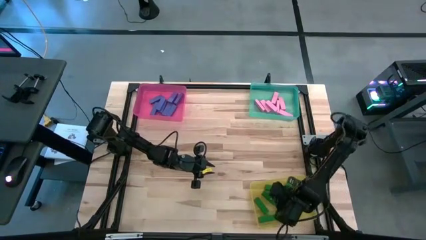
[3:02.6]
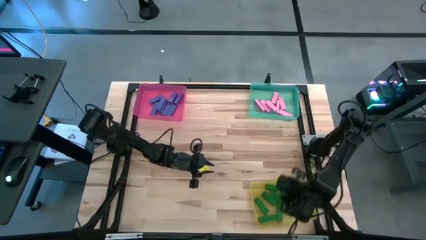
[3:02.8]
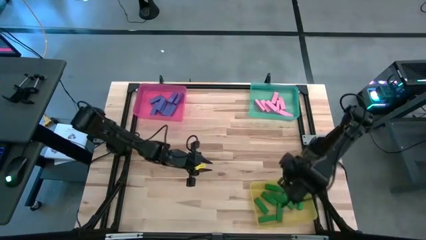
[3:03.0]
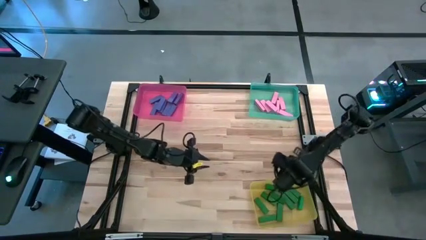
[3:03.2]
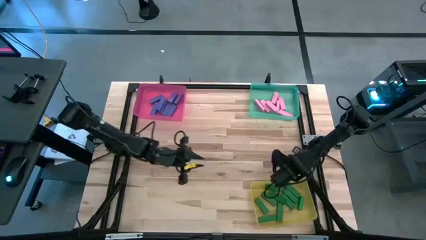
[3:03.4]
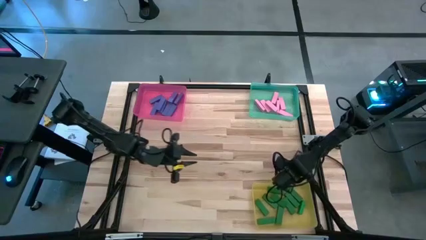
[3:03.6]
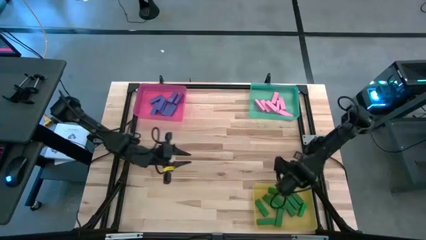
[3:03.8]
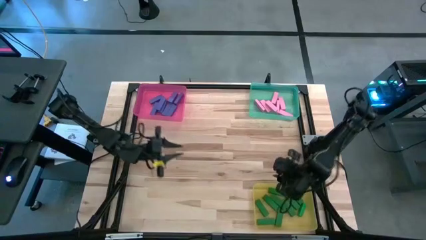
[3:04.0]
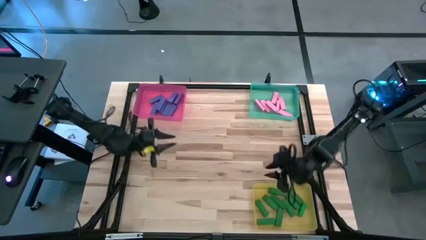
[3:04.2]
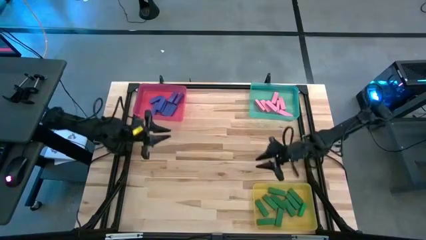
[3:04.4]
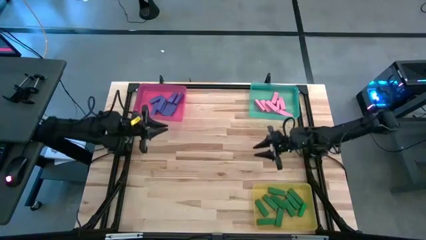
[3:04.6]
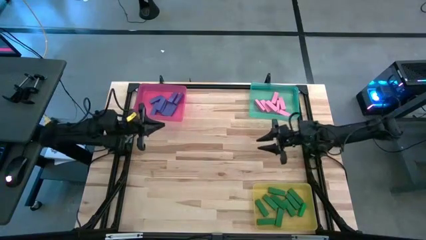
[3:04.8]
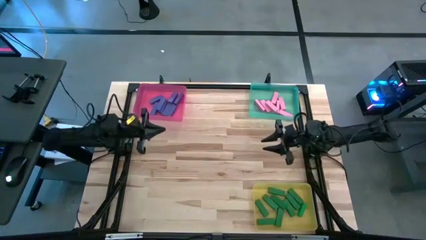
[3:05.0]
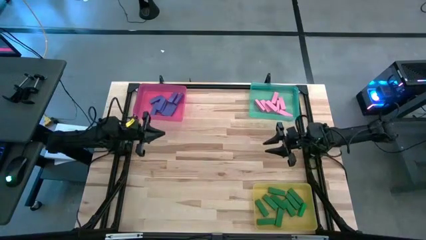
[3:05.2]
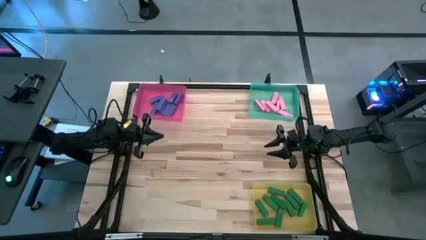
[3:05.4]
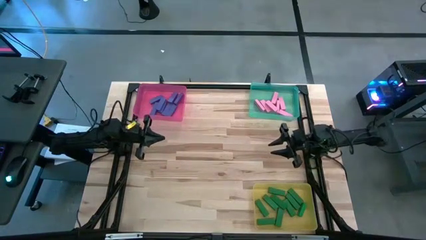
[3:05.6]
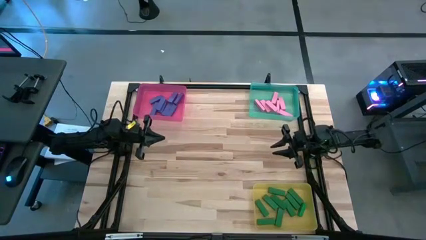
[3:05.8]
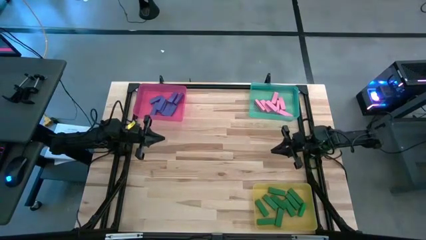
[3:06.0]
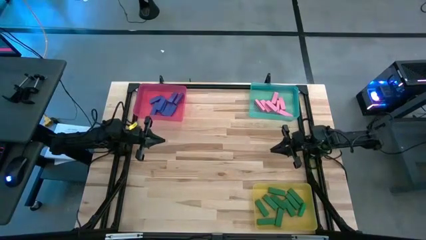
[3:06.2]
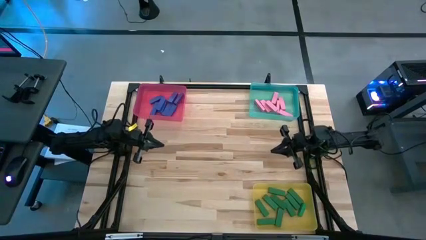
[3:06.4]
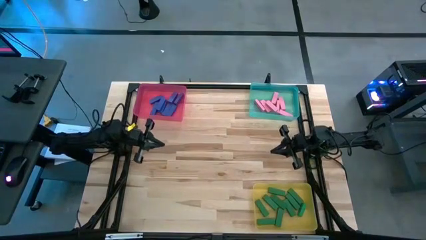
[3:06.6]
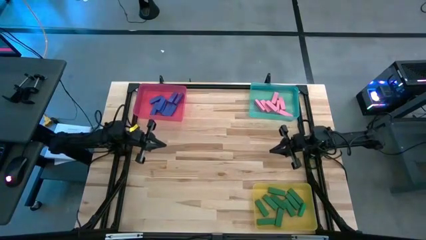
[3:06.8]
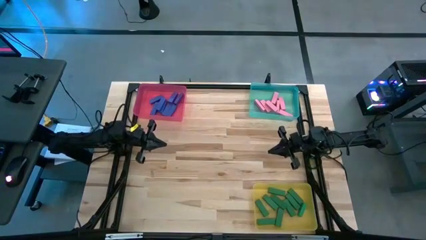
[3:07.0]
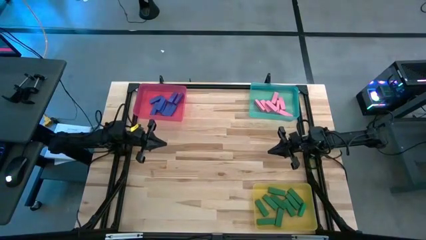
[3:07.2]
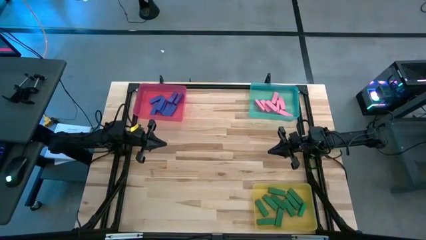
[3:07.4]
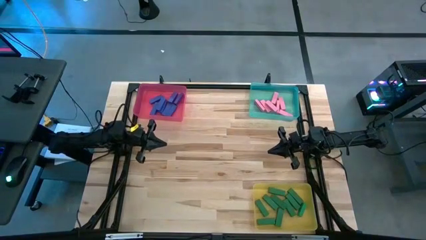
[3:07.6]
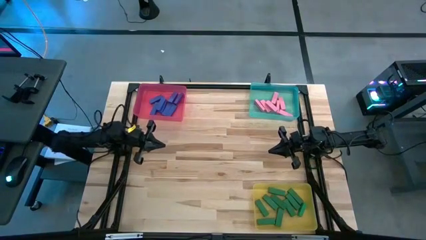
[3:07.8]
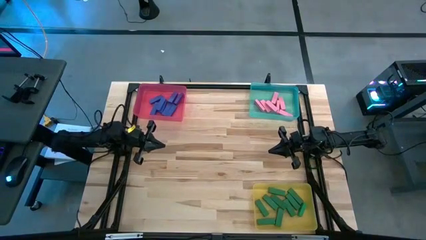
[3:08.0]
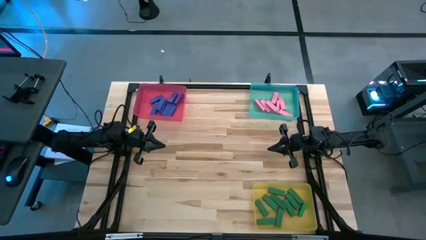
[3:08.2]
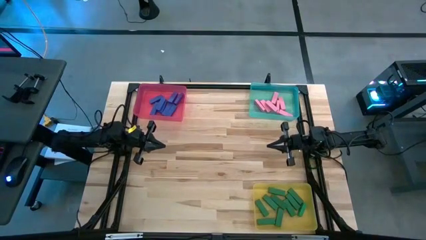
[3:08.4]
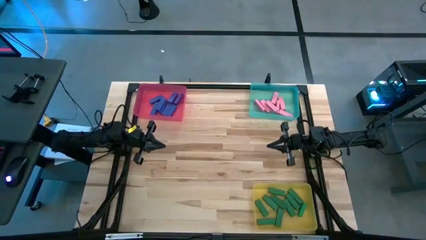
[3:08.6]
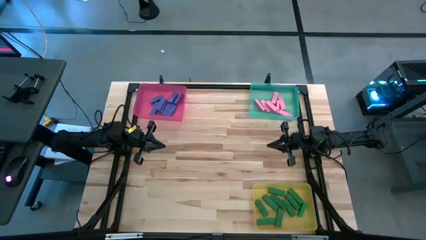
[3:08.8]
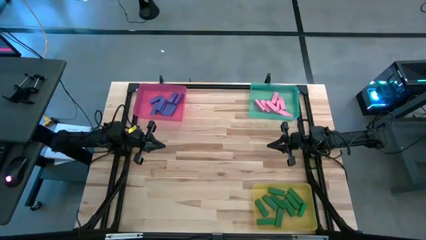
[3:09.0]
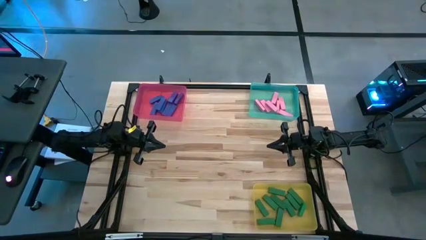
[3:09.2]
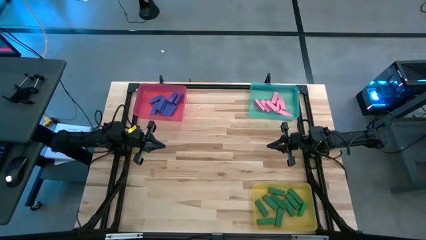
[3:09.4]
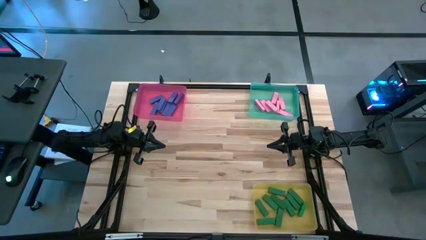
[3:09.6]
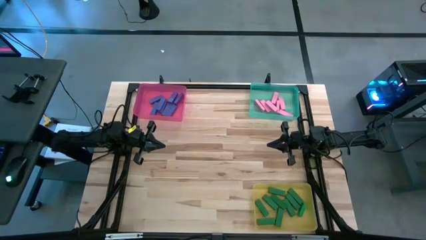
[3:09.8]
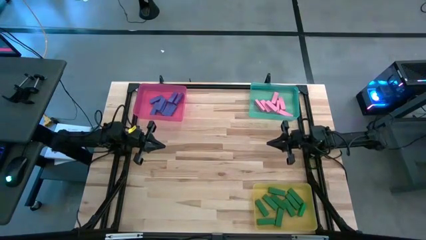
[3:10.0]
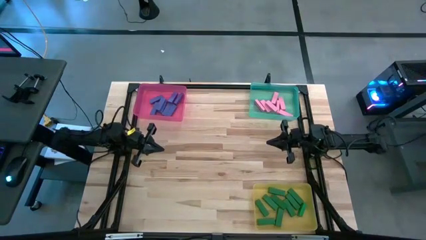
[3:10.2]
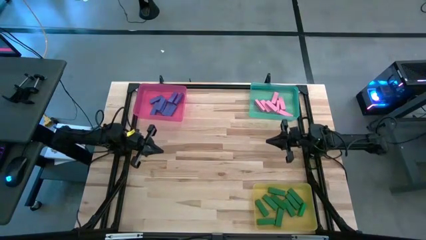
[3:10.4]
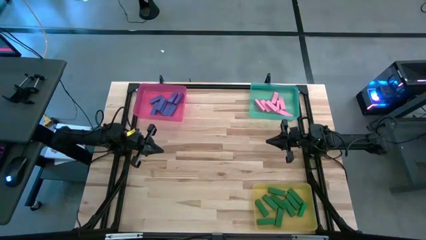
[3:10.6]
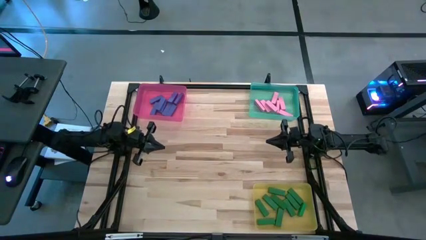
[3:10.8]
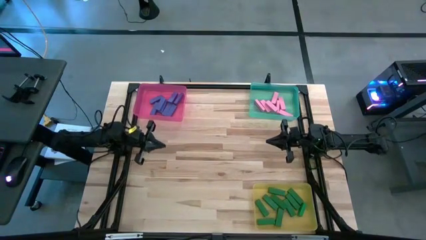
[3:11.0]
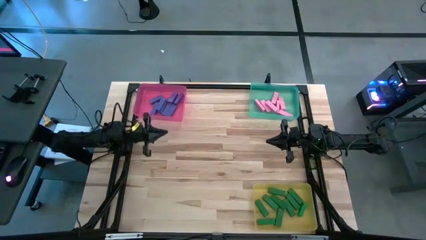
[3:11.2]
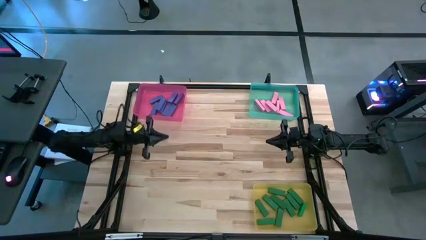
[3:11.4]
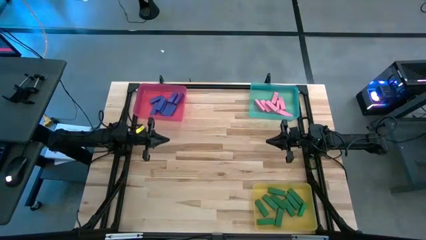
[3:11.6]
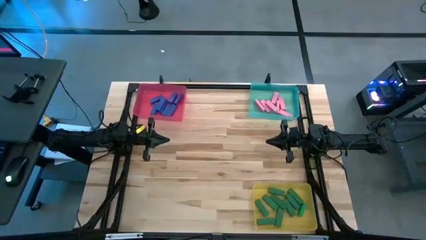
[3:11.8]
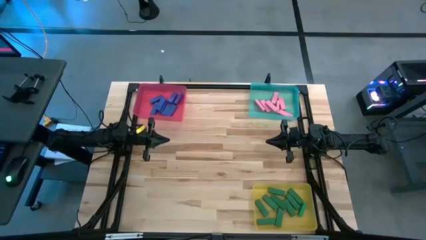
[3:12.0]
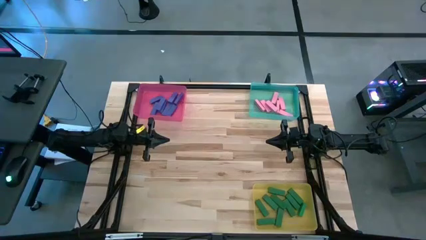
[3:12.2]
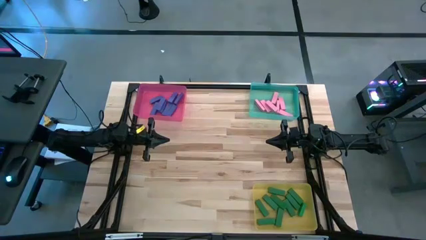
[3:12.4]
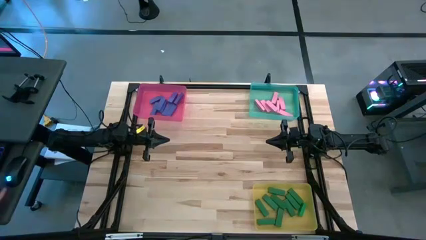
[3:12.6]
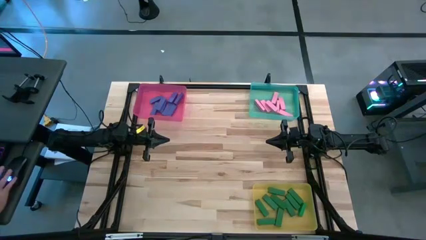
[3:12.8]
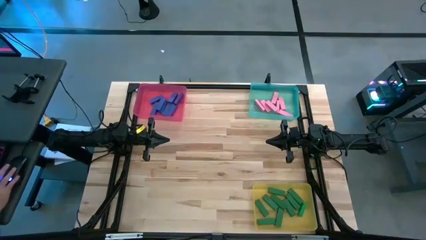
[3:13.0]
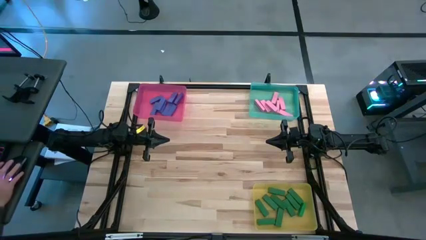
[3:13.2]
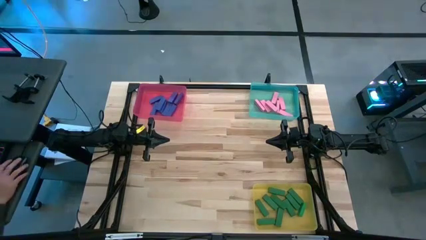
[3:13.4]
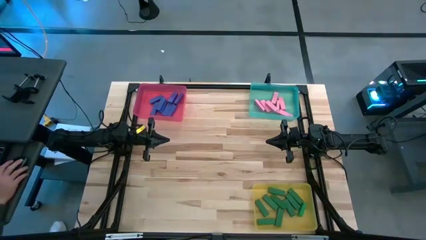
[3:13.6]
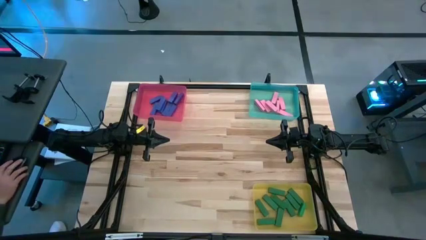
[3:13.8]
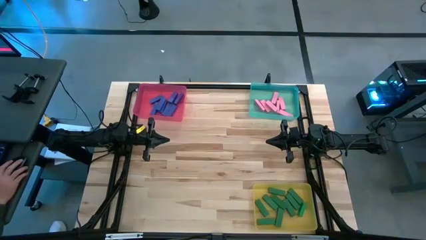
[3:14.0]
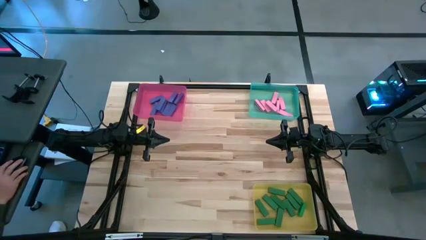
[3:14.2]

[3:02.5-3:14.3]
Task: Sort blocks
Return to Home Position

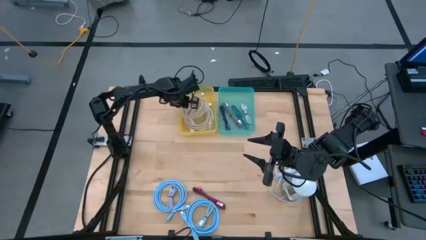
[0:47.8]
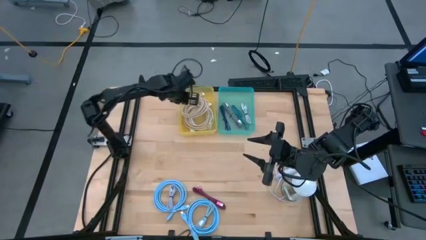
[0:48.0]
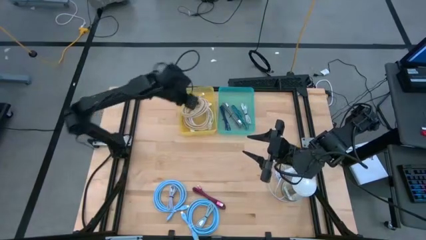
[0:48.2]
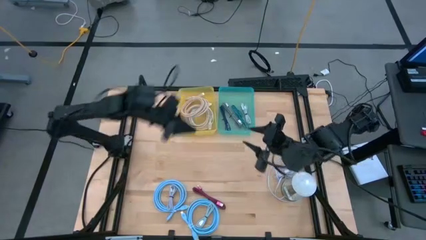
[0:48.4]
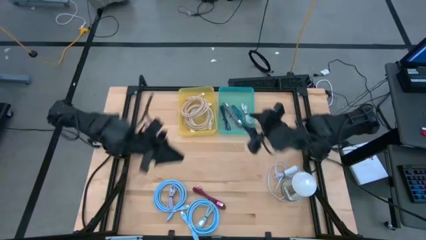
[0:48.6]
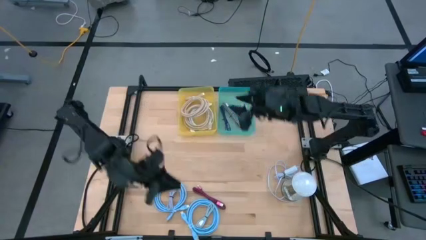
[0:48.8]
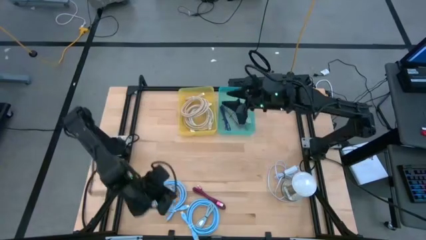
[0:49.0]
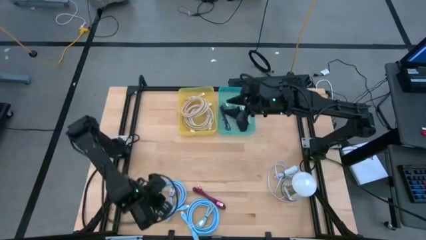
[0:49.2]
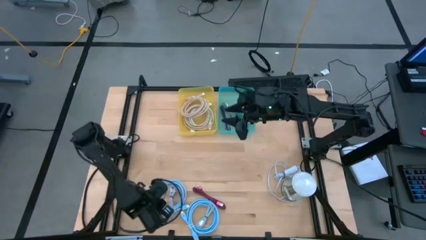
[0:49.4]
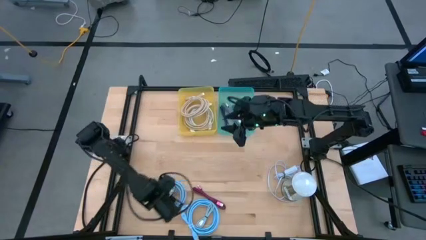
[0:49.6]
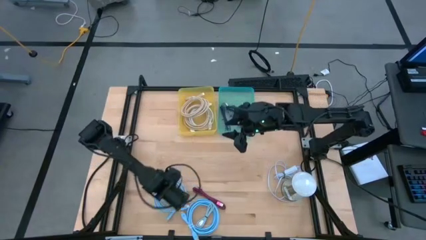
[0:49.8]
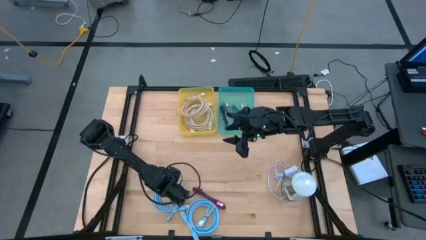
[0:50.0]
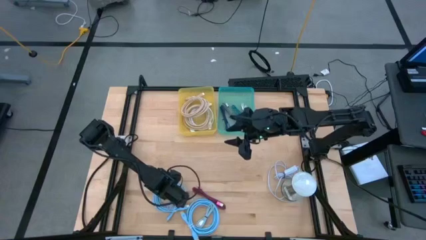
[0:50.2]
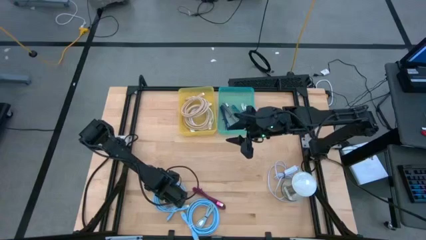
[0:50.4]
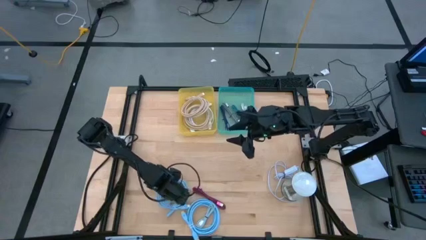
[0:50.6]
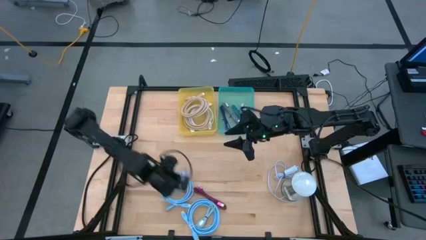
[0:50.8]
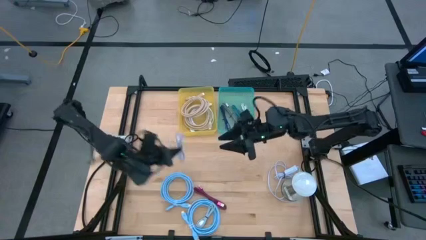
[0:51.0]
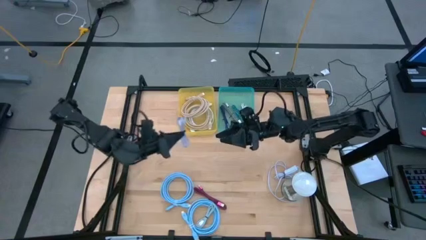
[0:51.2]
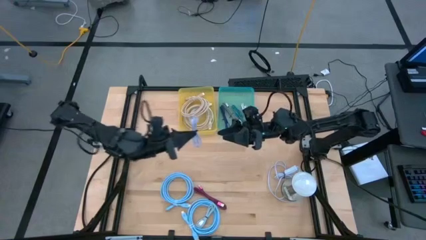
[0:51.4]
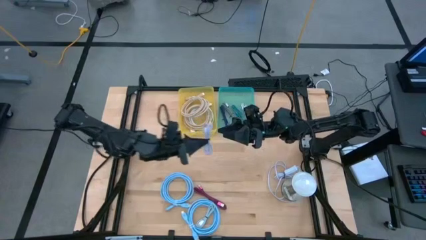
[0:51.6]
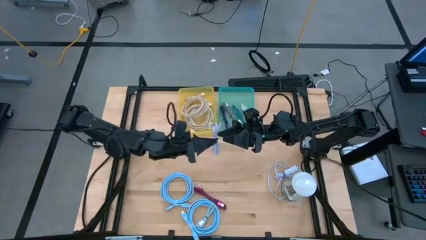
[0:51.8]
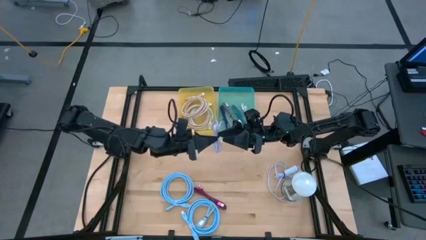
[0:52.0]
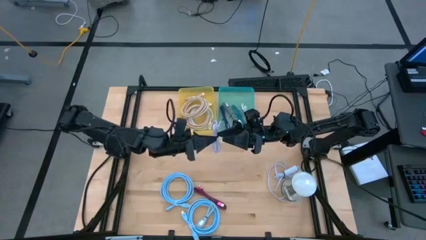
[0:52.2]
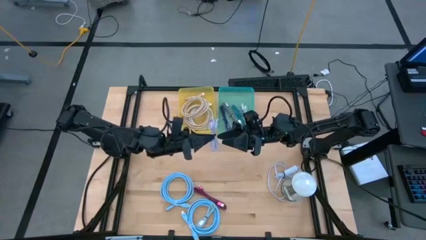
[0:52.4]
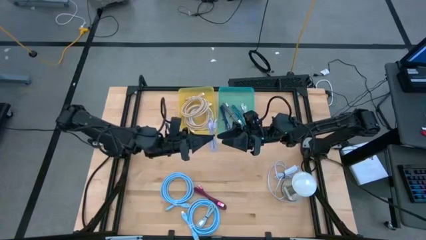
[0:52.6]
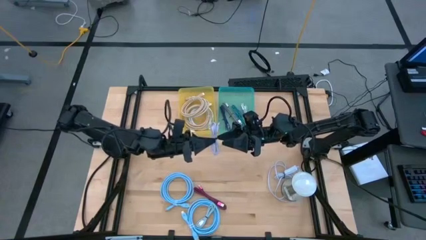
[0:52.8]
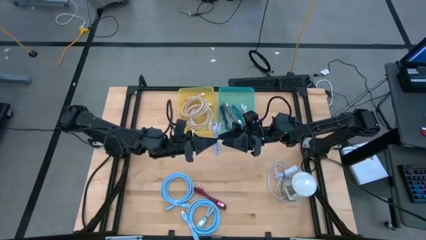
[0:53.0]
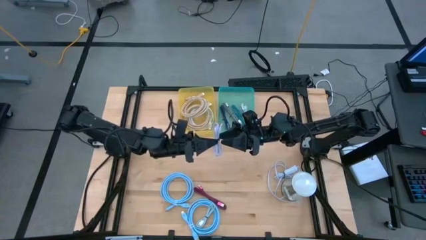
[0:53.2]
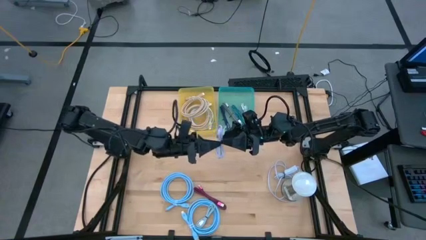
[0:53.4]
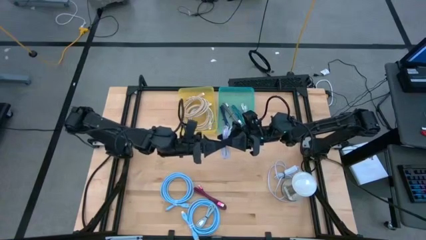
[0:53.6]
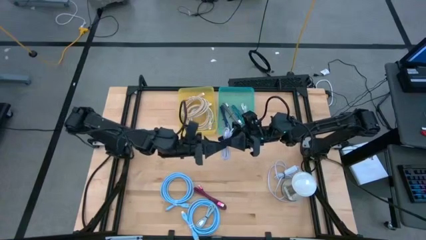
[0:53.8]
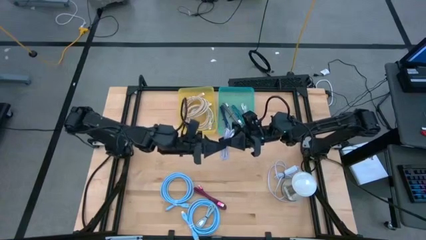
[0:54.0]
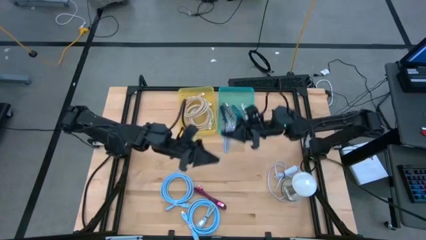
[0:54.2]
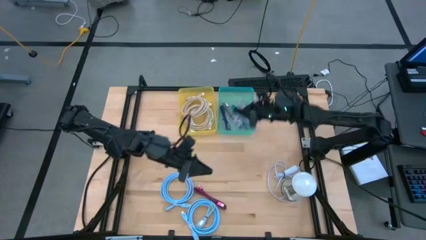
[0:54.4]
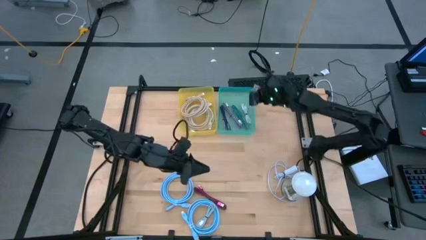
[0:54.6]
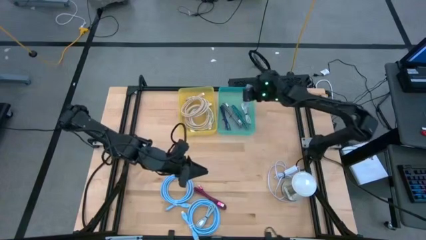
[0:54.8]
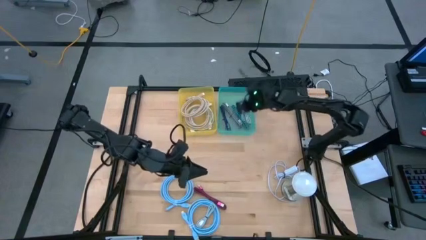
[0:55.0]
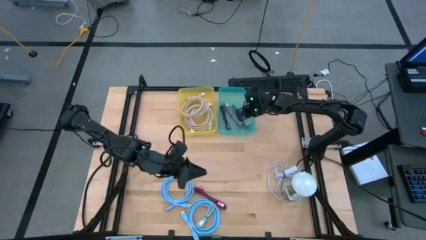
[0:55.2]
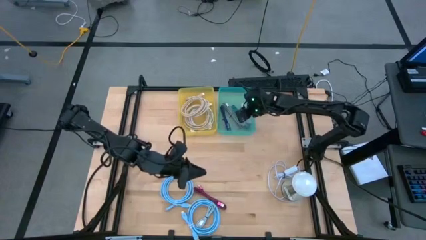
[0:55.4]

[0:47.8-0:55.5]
Task: Pick and place USB-C Cables
Put the small purple charger cable into the green bin
